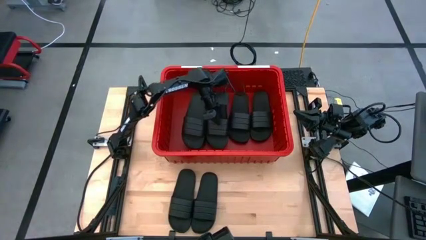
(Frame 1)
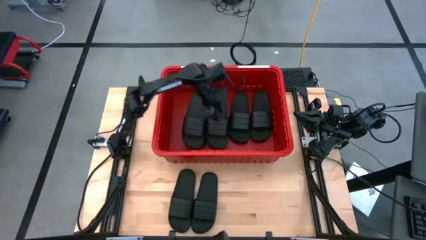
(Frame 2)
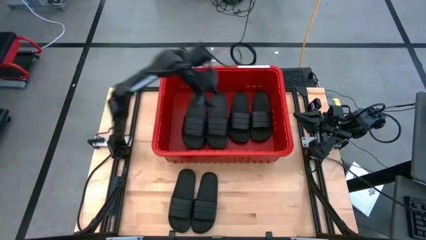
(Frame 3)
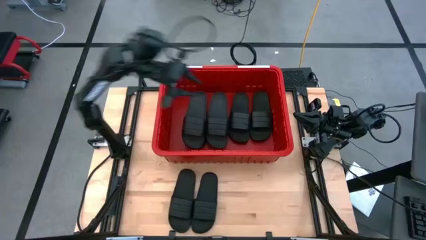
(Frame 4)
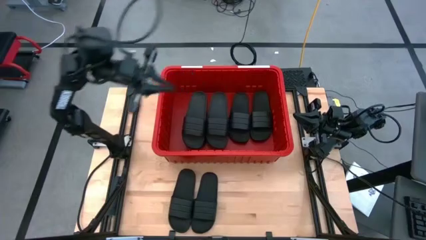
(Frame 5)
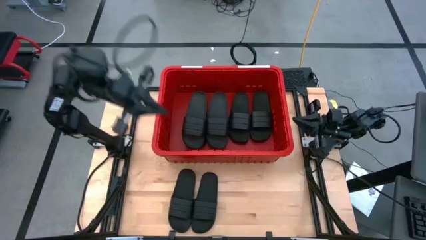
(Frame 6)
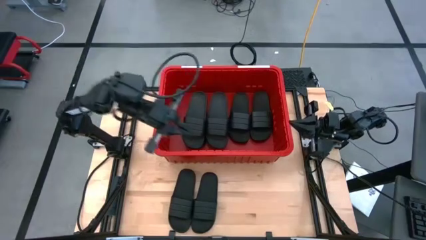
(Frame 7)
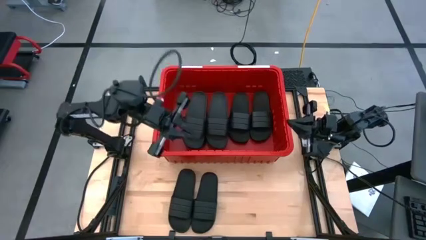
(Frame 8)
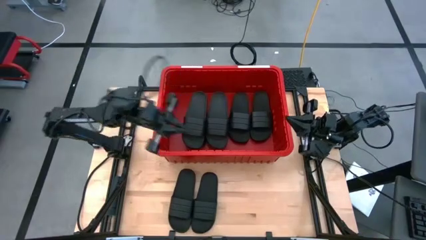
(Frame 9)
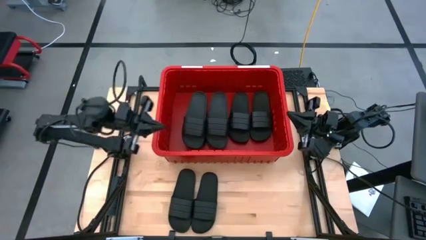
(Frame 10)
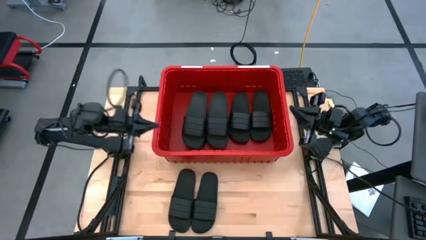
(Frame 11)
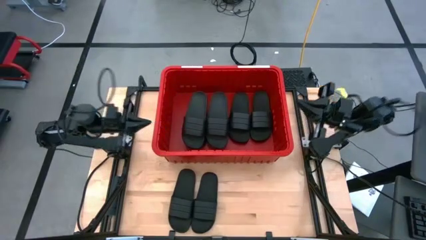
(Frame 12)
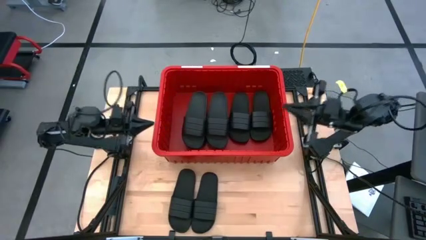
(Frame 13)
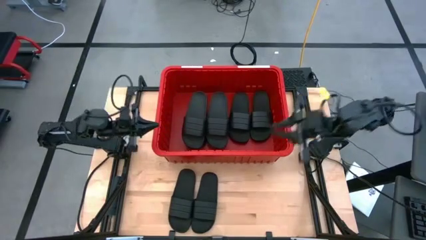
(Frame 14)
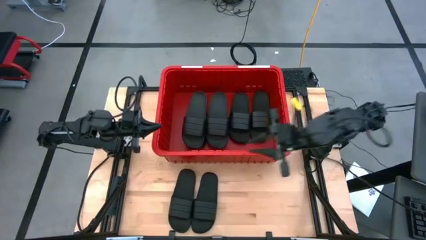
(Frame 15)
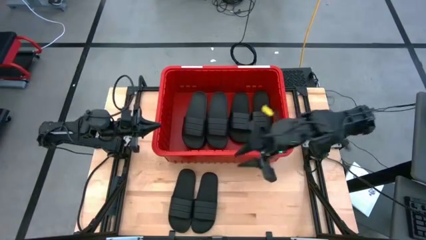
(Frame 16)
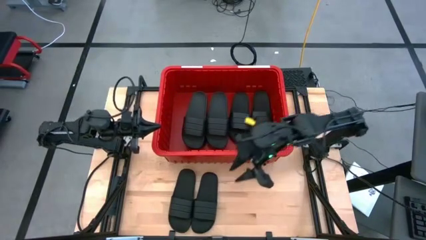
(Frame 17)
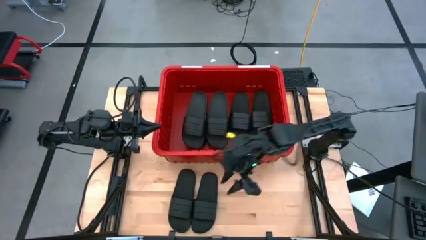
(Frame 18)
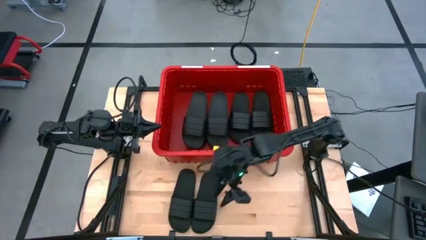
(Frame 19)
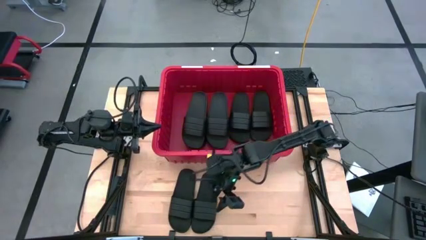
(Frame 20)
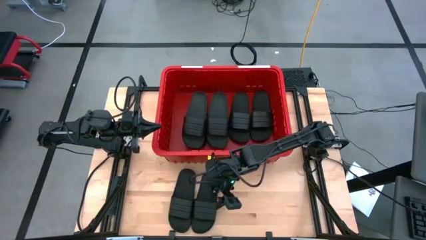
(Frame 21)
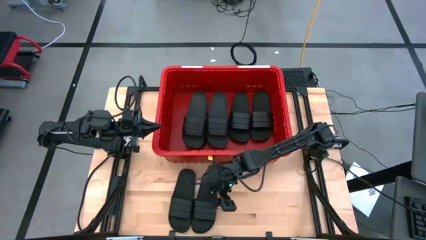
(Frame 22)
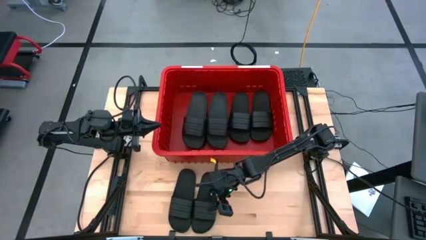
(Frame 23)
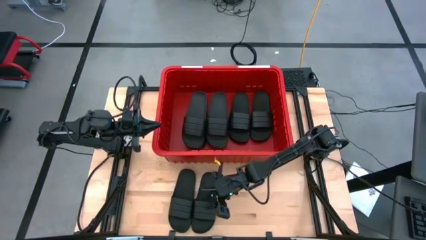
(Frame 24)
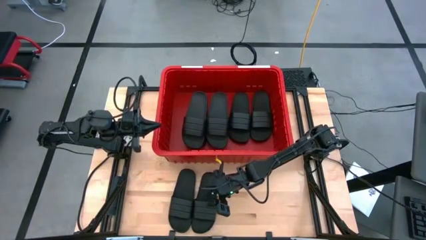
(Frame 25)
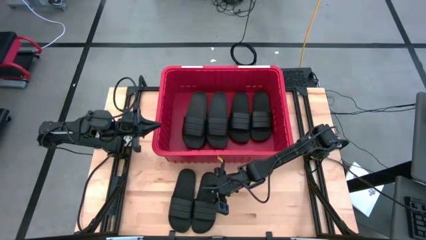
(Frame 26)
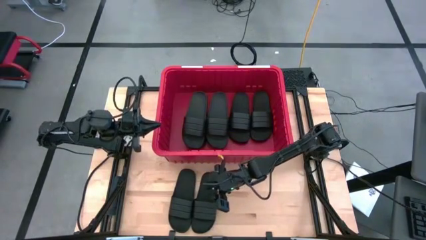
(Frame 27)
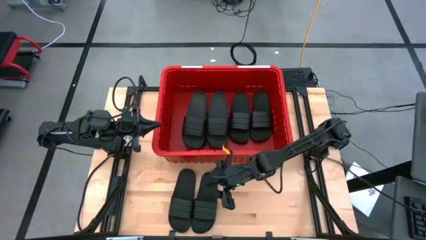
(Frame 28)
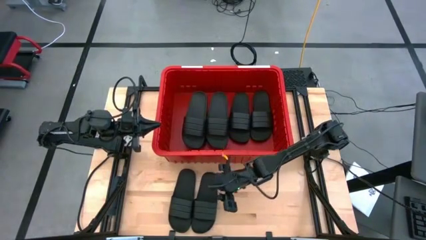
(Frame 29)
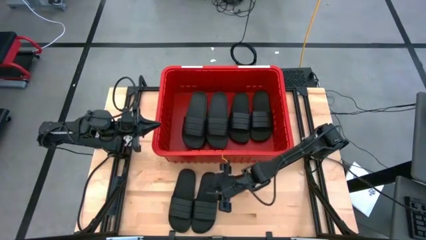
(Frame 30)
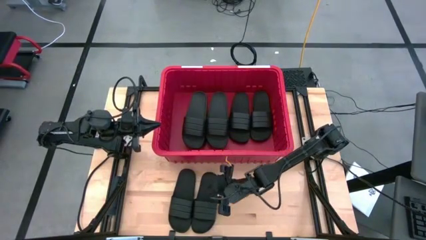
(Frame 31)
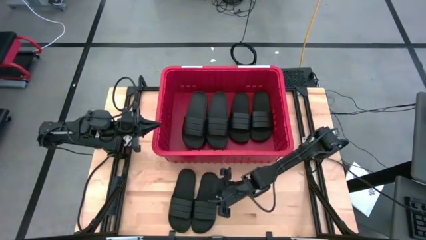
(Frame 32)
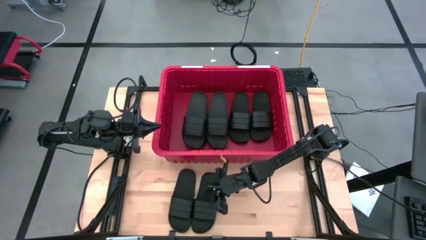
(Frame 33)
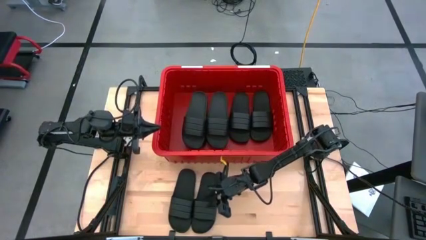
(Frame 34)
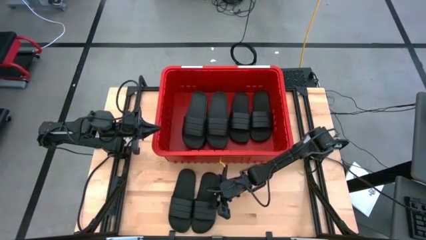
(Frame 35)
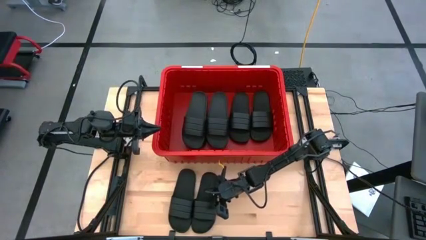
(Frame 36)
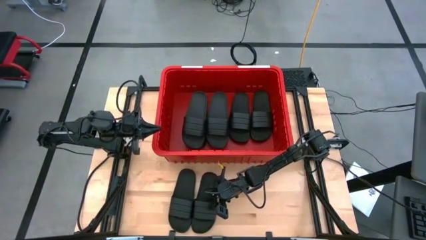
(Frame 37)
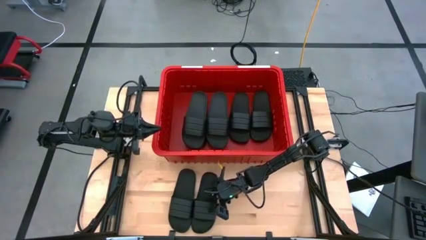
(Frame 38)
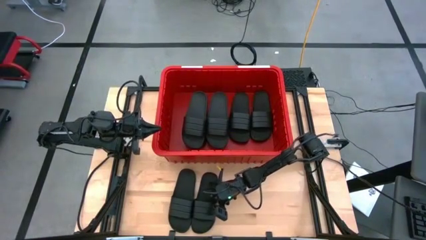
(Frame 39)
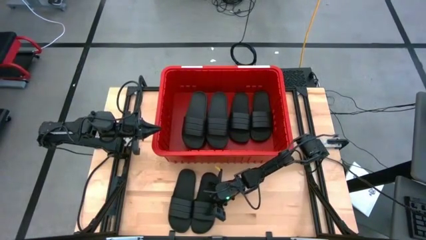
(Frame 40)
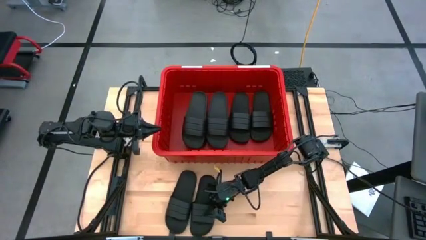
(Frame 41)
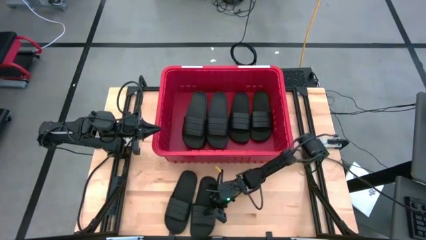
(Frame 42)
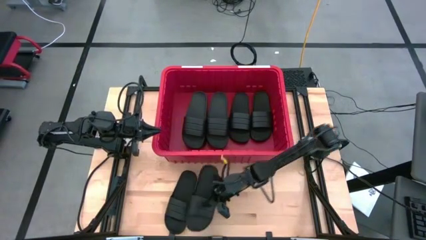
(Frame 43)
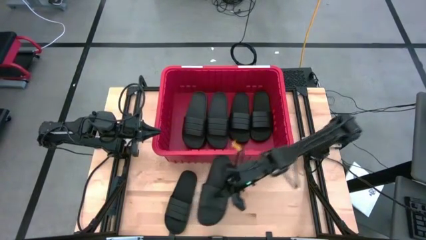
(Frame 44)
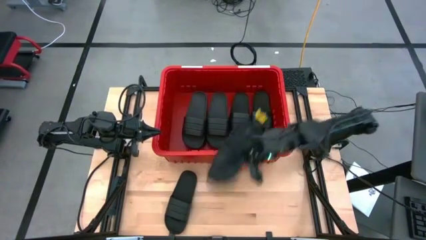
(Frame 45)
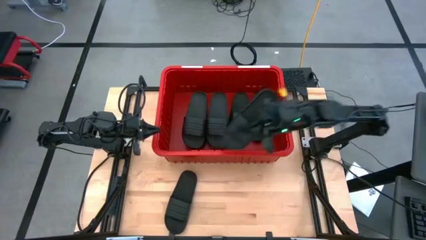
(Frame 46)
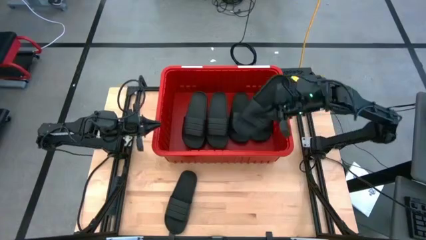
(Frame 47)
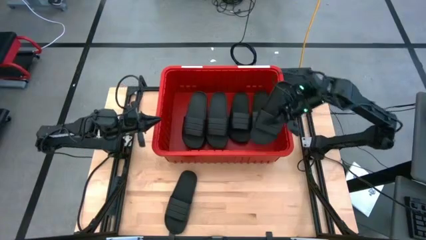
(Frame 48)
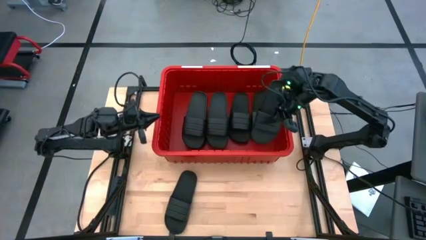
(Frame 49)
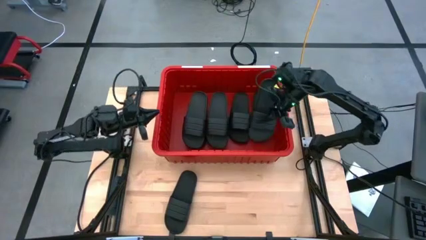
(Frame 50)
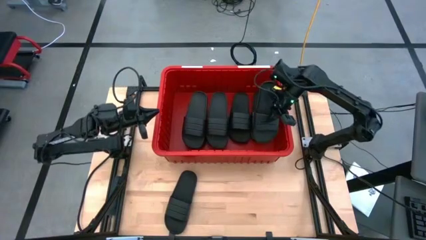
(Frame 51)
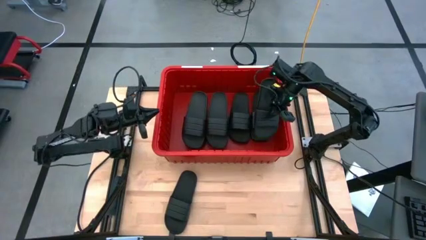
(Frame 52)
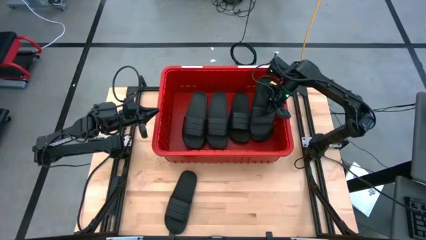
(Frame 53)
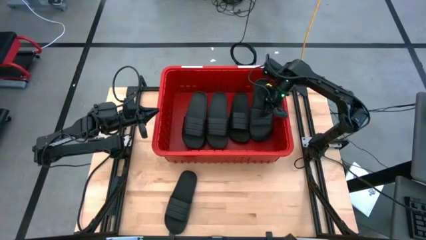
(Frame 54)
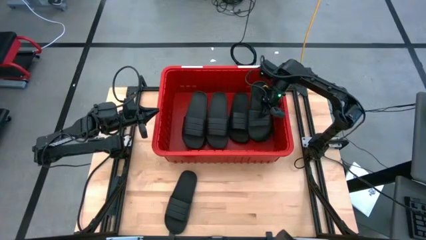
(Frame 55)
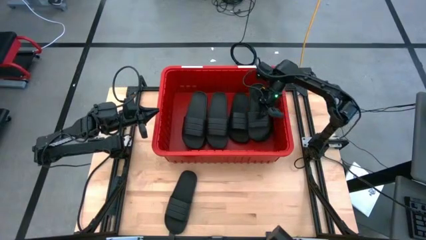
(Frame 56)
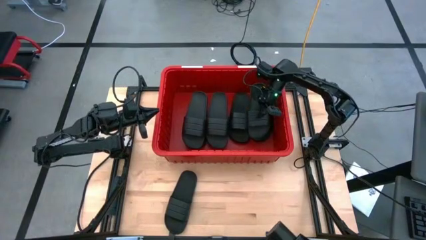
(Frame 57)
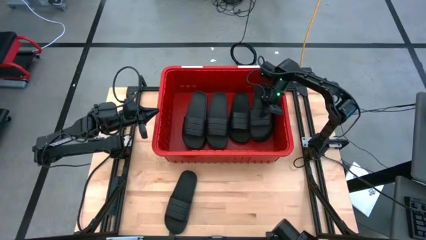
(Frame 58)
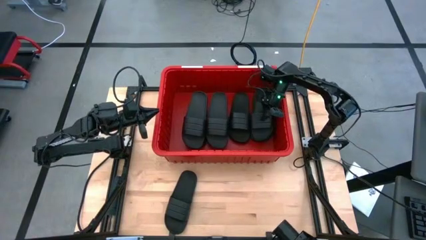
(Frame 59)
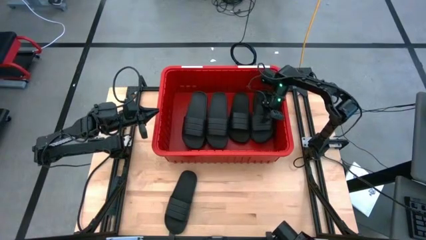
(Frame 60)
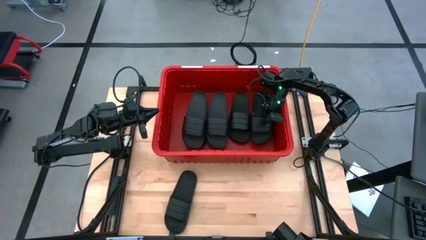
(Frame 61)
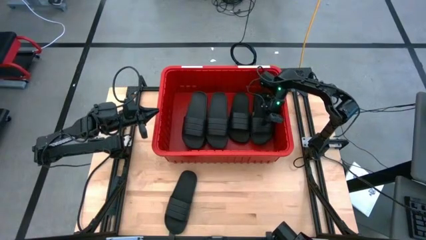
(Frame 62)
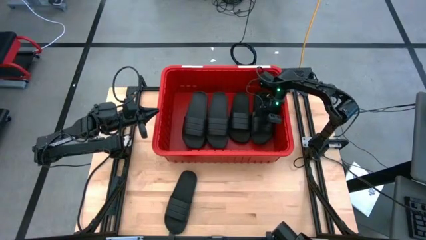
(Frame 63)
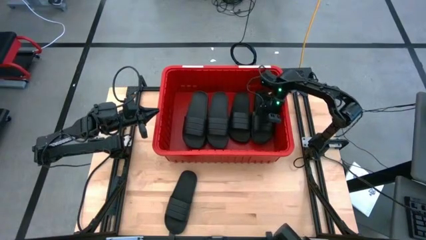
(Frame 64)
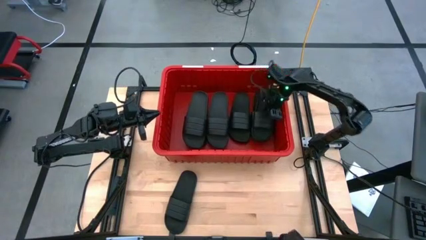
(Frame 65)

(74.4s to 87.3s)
Task: Pick and place slides into bin
Put the right black slipper into the bin
